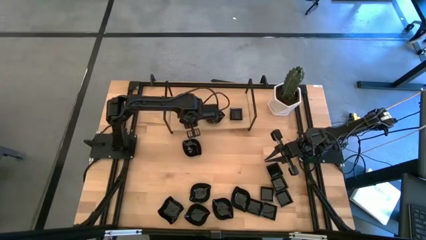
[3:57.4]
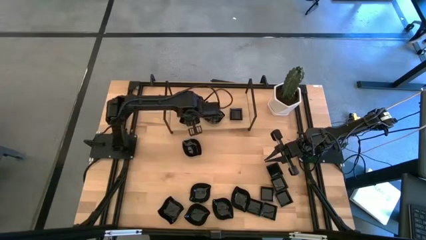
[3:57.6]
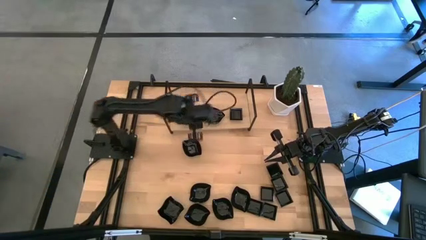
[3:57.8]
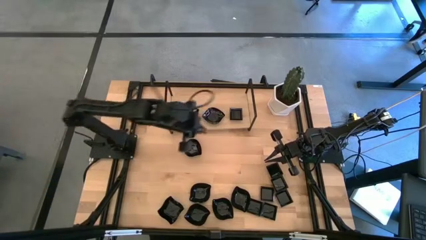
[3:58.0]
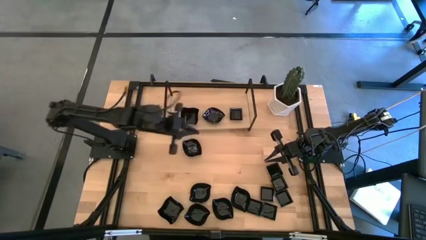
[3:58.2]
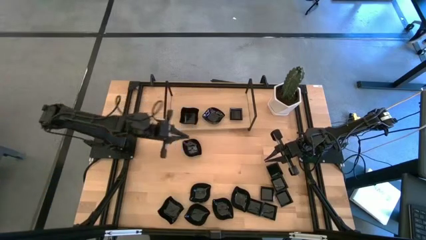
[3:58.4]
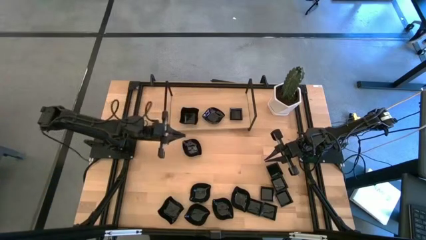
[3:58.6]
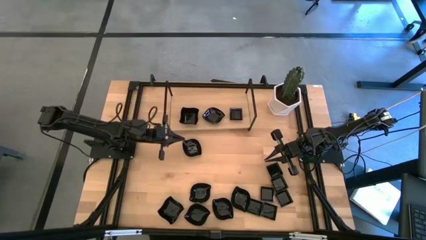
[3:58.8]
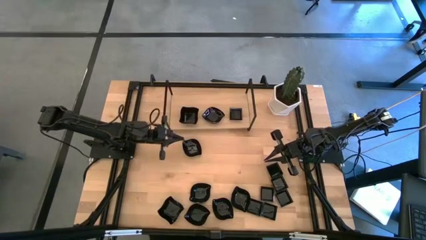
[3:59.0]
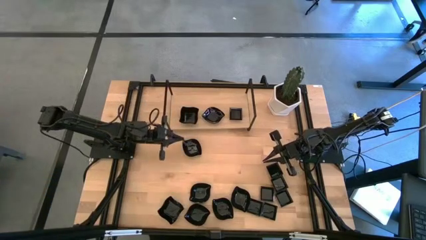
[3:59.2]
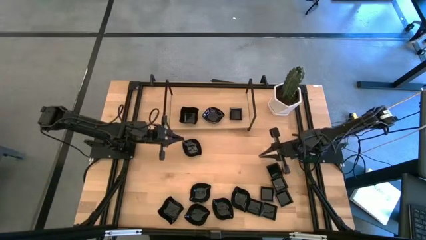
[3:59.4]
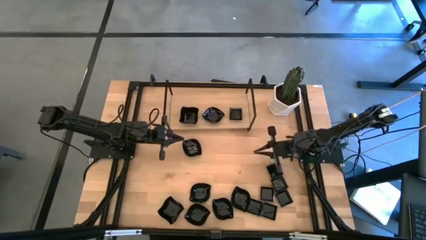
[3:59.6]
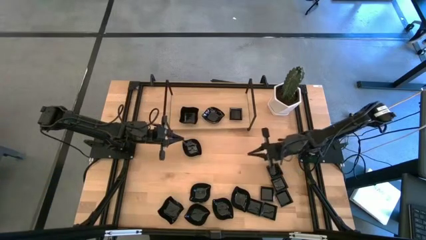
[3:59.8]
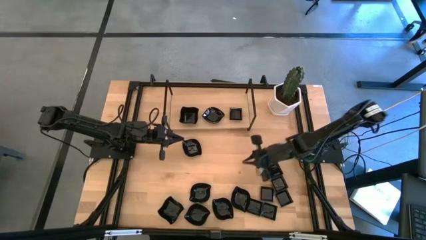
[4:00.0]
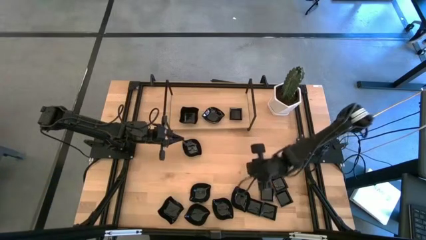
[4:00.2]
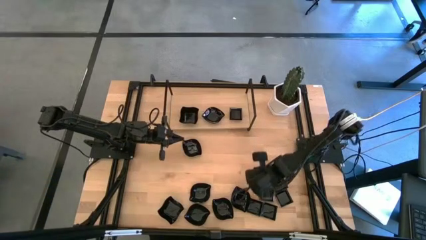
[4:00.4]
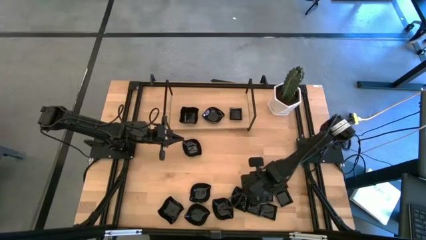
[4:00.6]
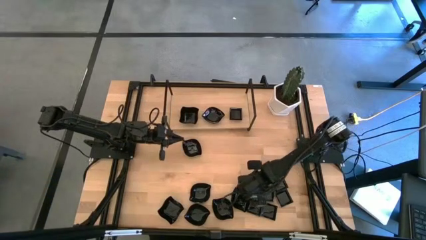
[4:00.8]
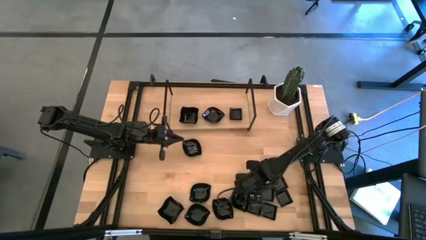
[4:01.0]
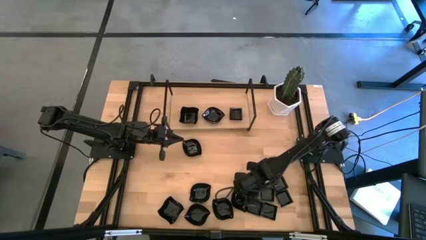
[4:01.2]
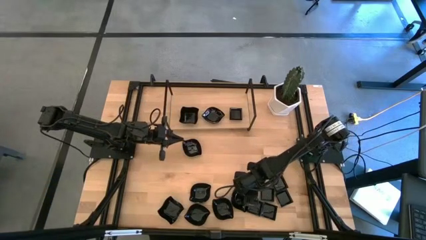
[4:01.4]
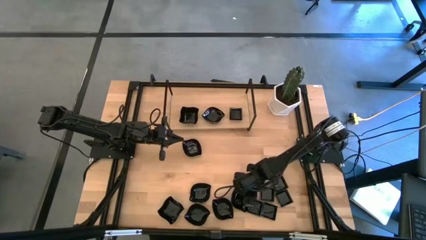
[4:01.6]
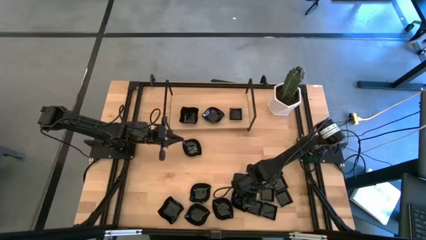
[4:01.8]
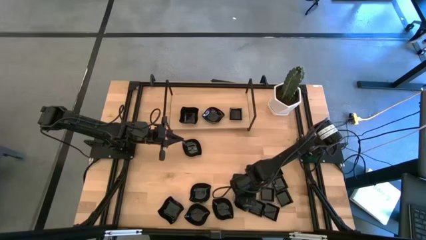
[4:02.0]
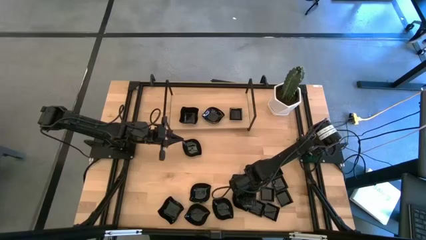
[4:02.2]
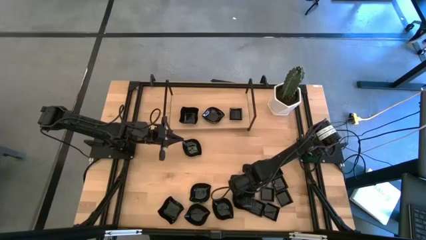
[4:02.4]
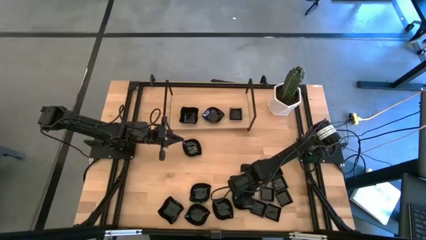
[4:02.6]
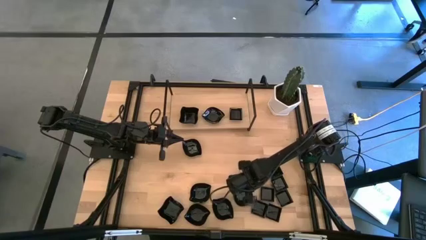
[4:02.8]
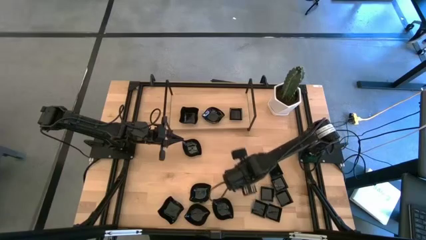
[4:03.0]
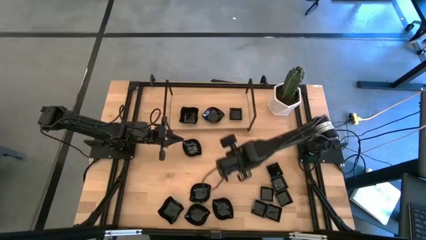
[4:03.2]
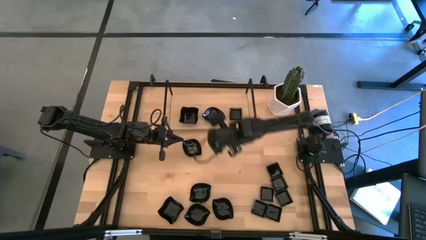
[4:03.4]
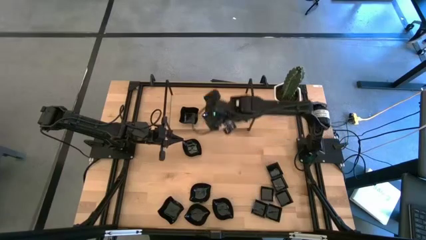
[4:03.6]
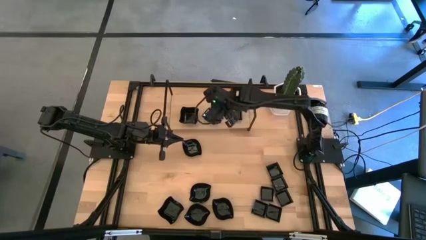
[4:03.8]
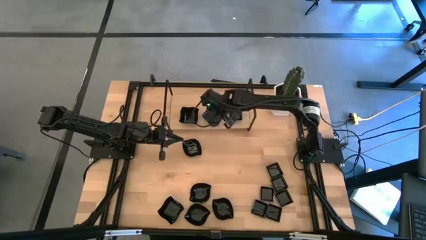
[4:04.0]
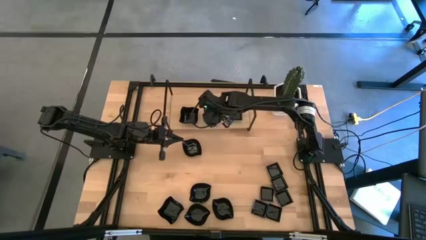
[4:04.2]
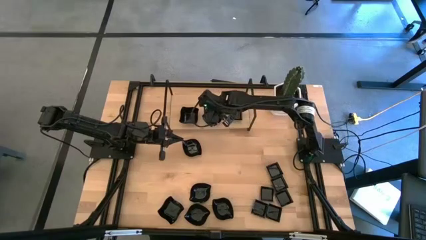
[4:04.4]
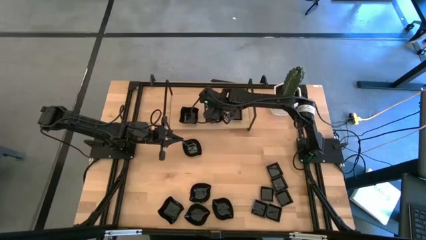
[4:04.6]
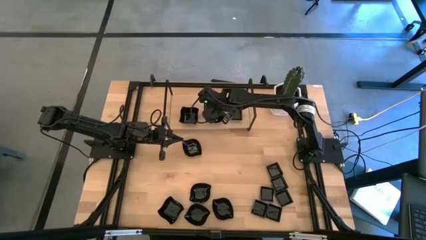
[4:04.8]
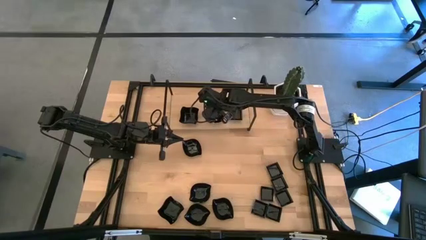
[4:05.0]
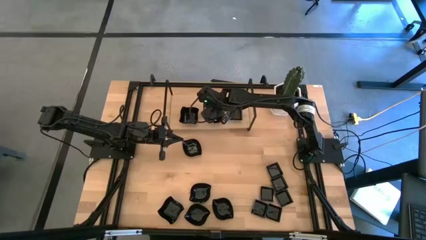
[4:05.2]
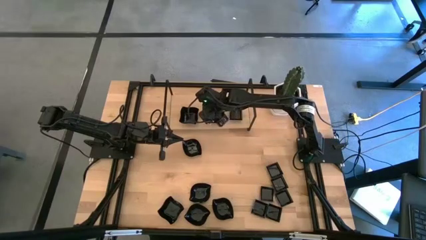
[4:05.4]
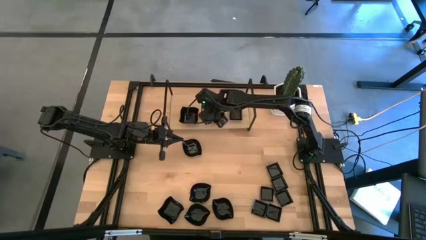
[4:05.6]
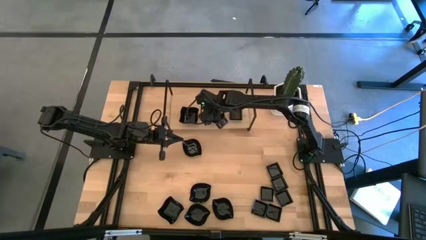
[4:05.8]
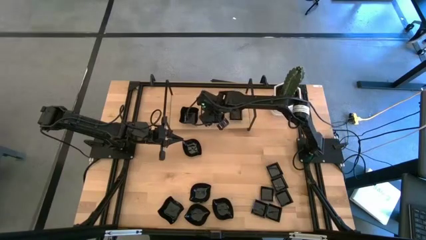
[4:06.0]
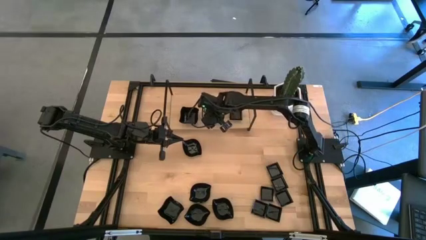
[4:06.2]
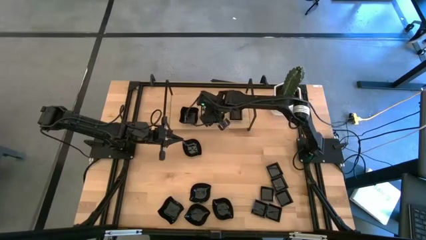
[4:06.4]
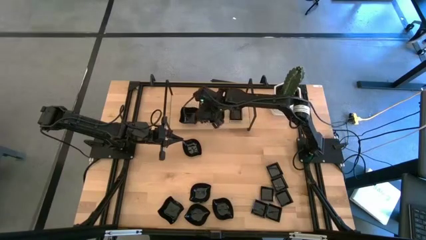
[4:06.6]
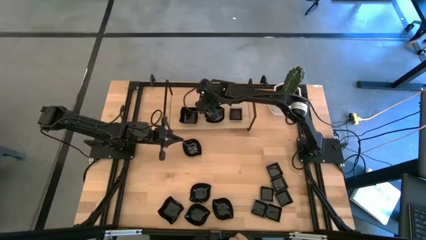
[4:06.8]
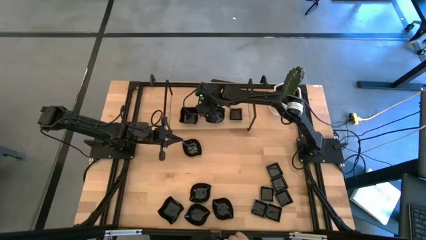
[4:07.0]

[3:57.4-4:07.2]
Task: Pick & Place Mini shaped plates
Stack the leaf-shaped plate on the top of the leaf-shaped plate on the shelf

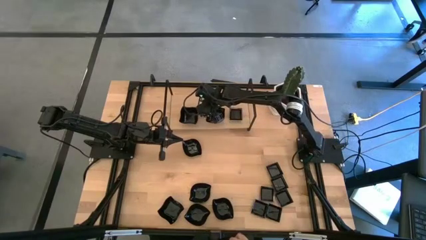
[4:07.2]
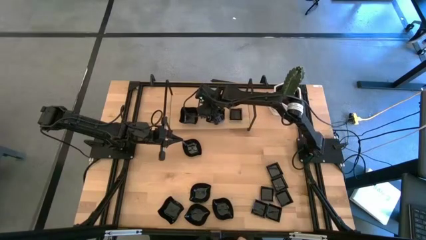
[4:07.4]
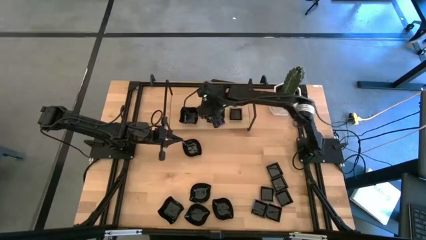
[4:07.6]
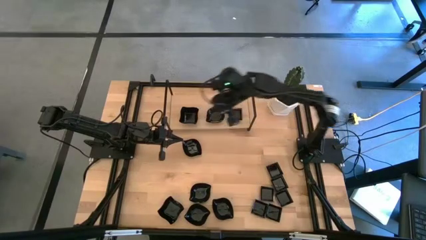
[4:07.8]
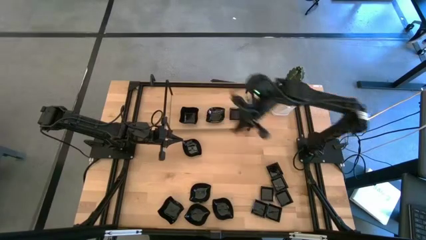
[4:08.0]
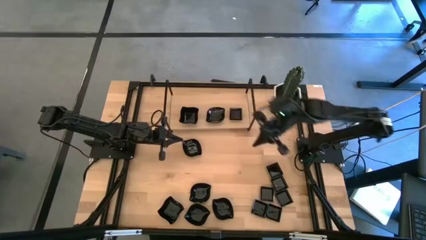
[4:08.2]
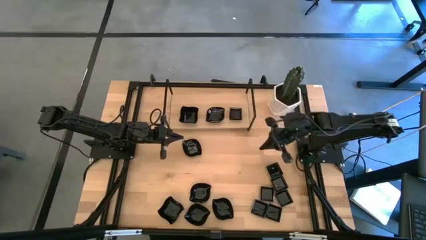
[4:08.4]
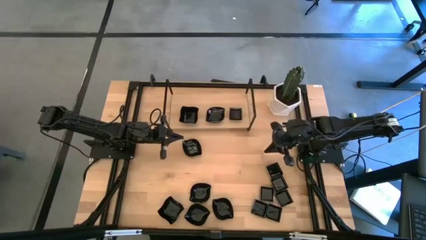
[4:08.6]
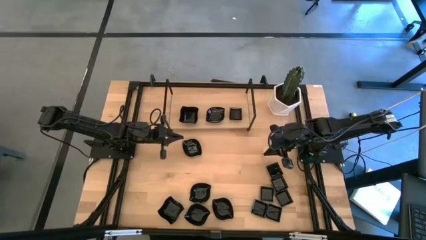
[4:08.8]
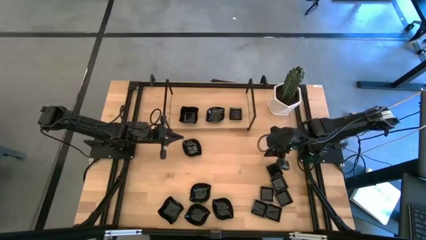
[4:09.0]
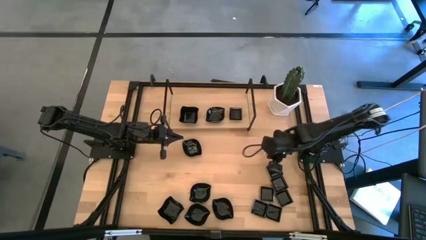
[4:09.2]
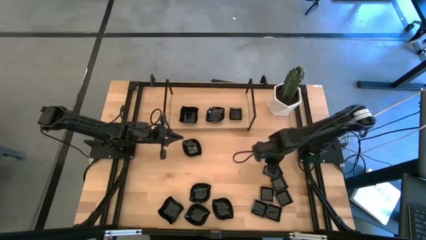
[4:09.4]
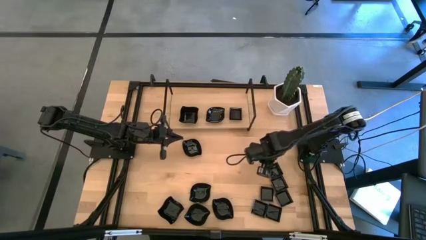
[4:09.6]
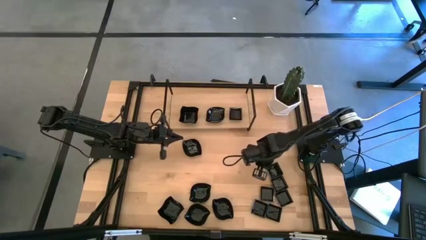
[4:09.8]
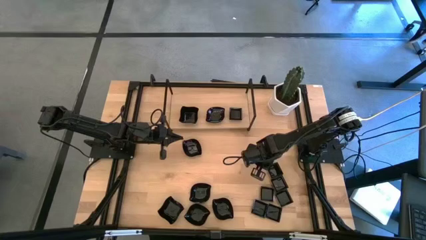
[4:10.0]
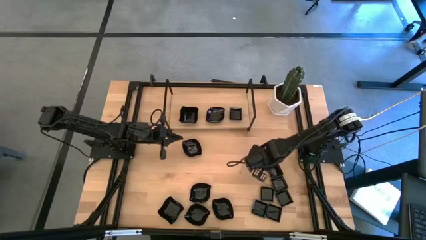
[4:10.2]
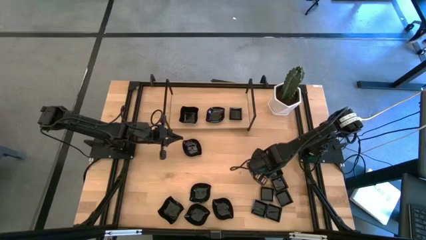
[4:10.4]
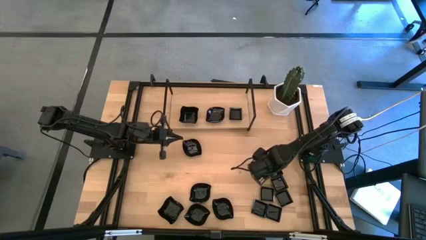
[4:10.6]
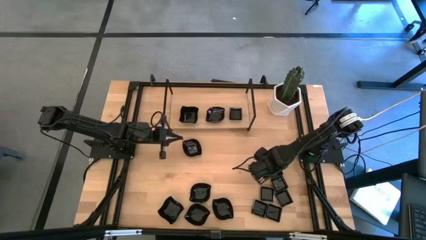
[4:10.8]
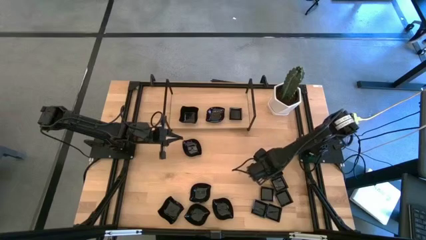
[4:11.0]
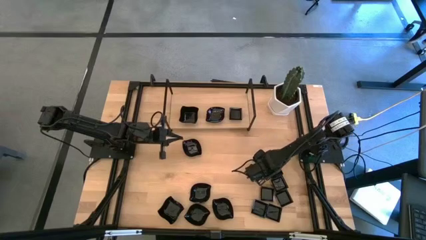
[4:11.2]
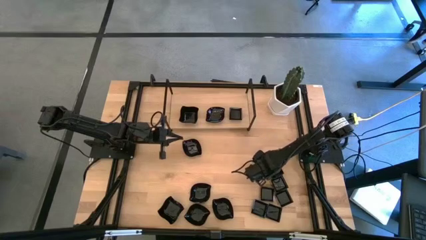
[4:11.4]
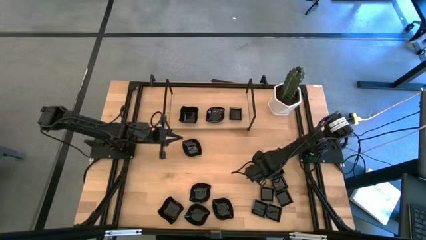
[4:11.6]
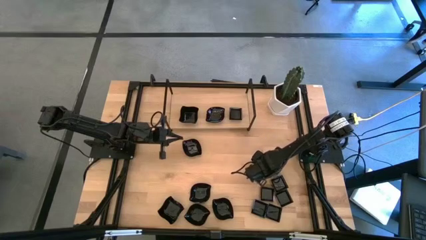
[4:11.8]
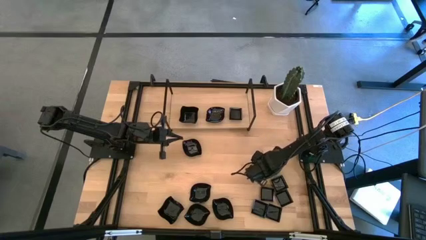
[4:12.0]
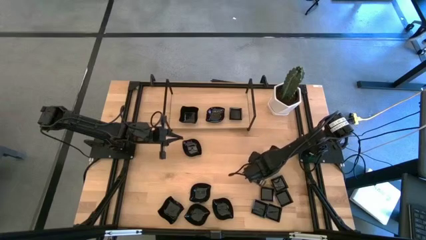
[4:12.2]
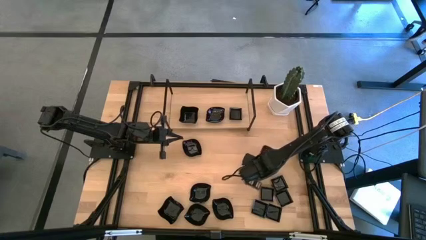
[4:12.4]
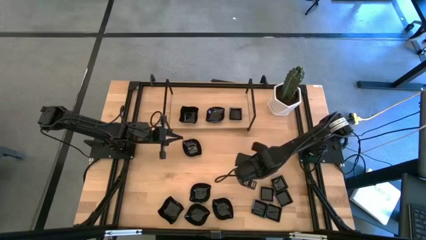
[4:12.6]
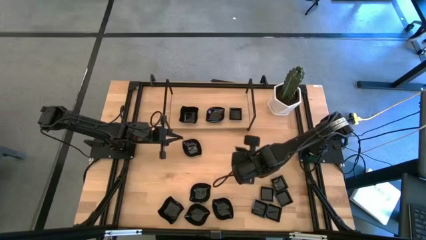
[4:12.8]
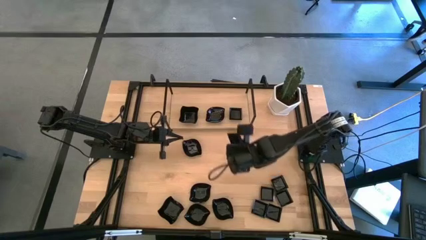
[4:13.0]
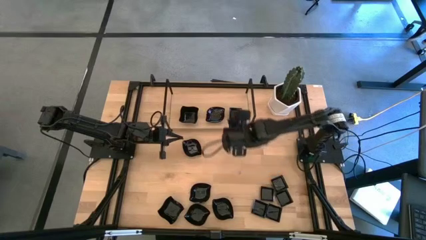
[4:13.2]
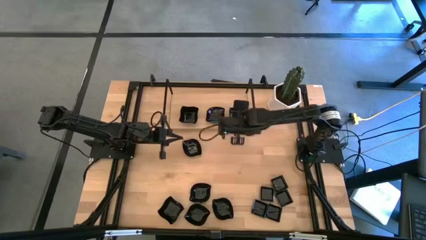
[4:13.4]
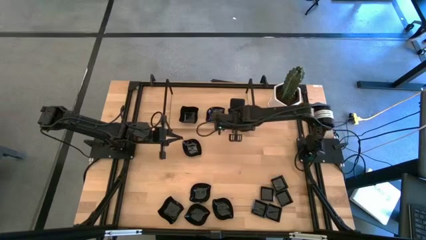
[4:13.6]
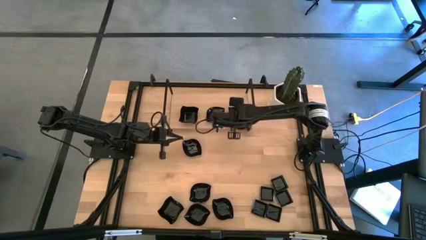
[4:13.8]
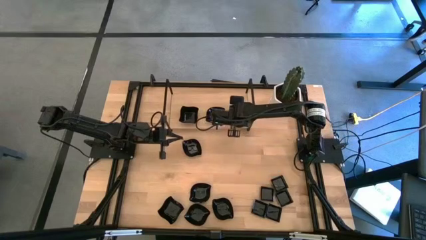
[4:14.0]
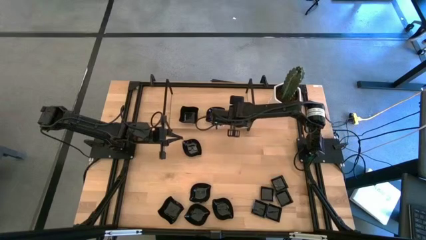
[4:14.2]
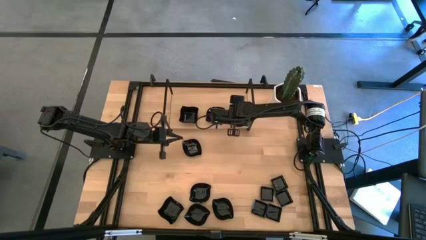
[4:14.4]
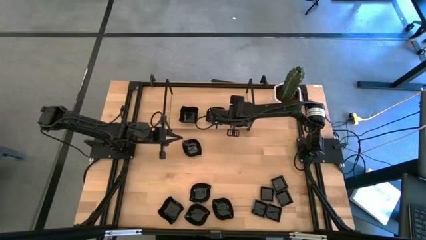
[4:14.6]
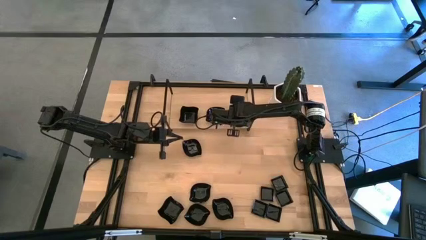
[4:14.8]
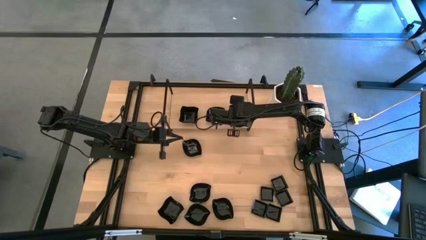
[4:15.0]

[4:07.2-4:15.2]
Stack the square plate on the top of the square plate on the shelf
